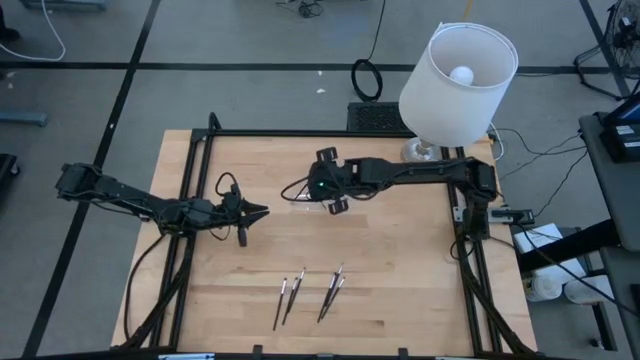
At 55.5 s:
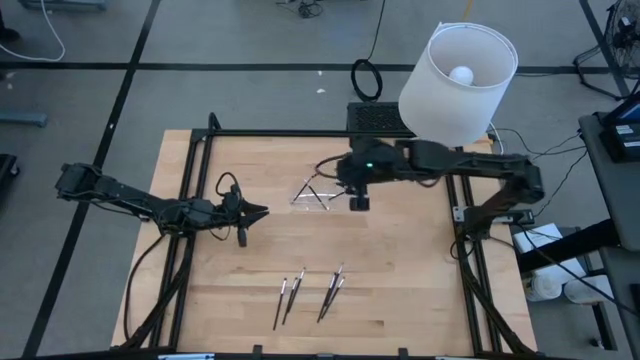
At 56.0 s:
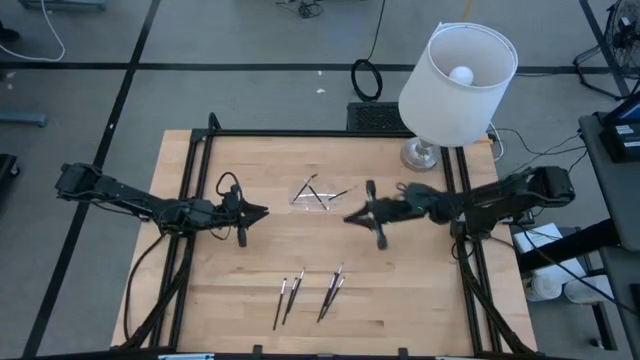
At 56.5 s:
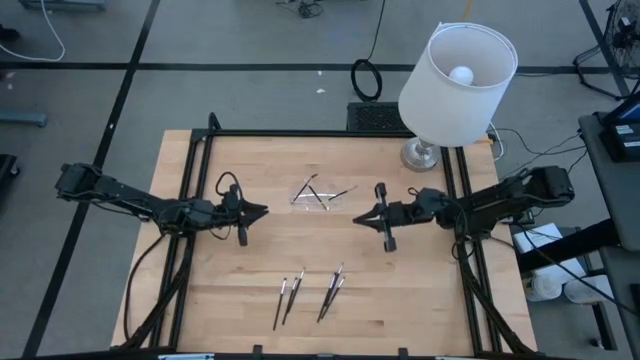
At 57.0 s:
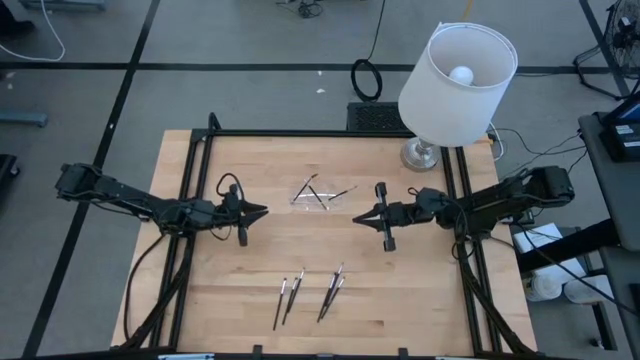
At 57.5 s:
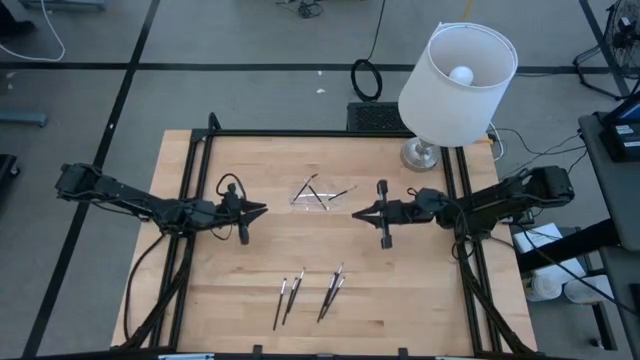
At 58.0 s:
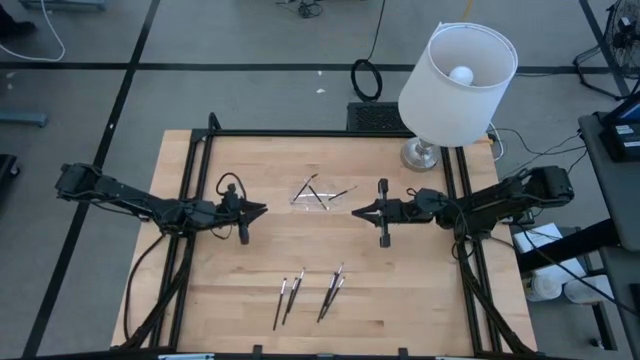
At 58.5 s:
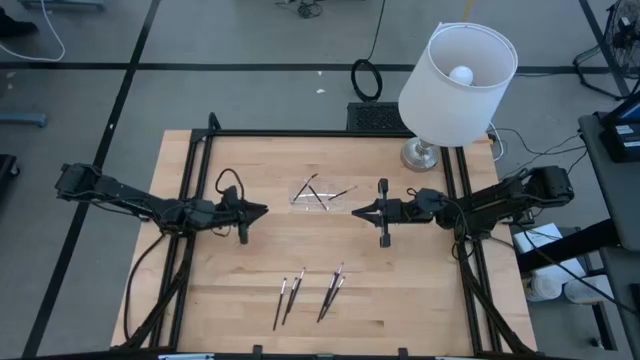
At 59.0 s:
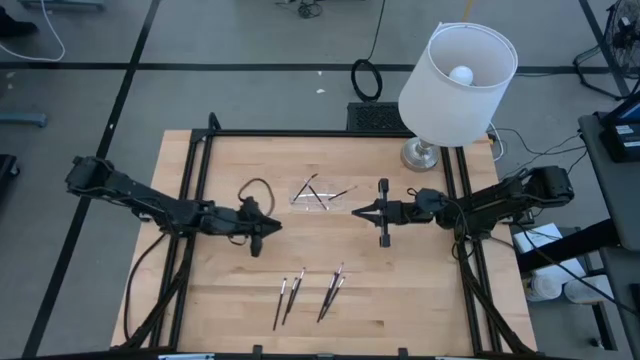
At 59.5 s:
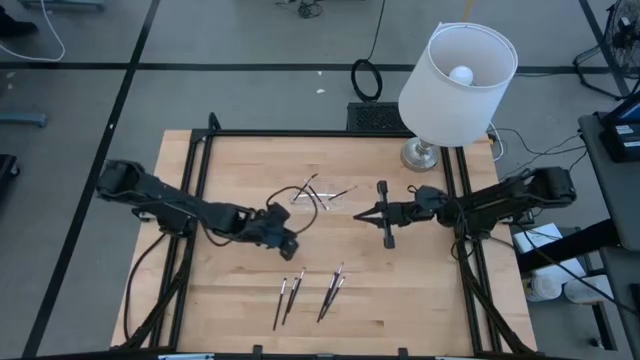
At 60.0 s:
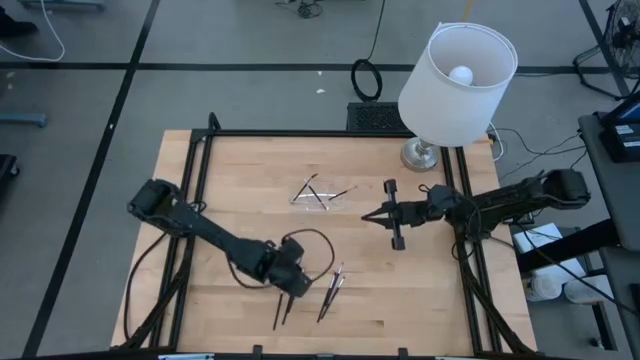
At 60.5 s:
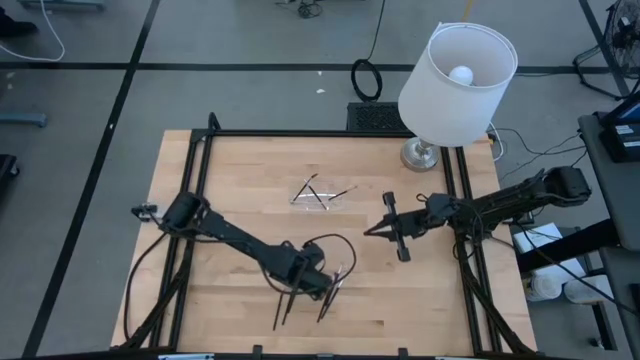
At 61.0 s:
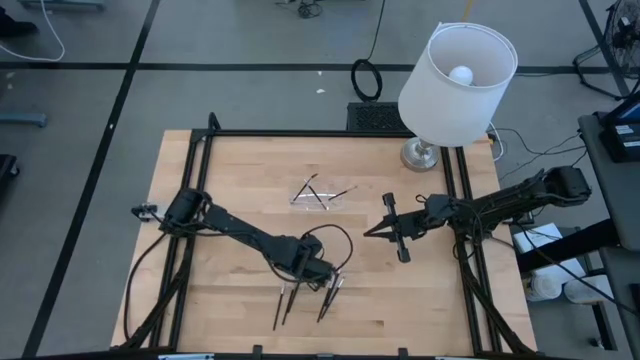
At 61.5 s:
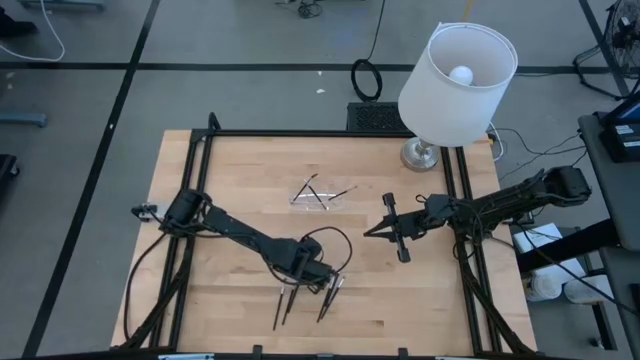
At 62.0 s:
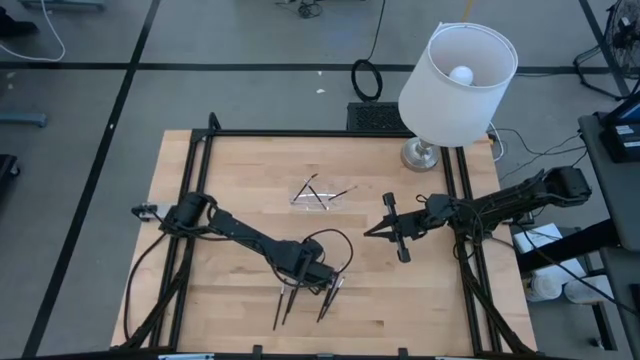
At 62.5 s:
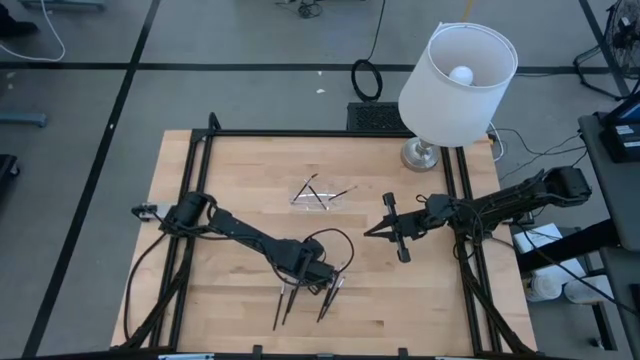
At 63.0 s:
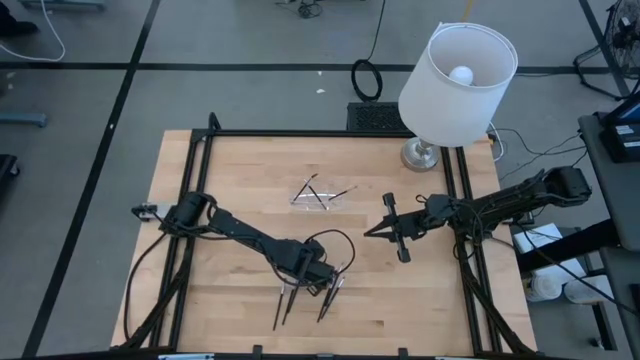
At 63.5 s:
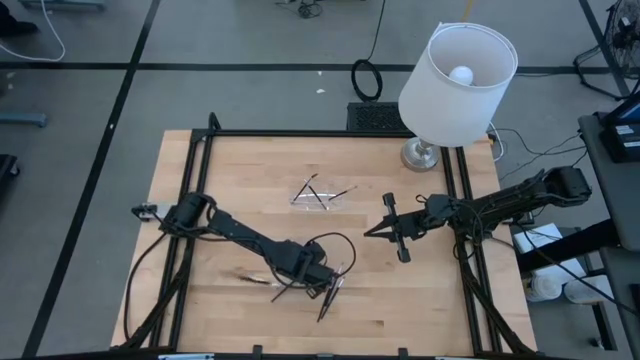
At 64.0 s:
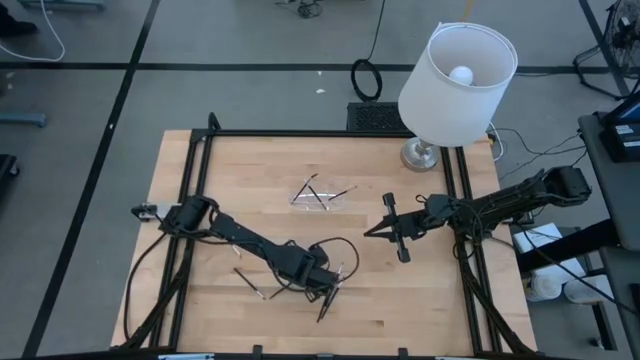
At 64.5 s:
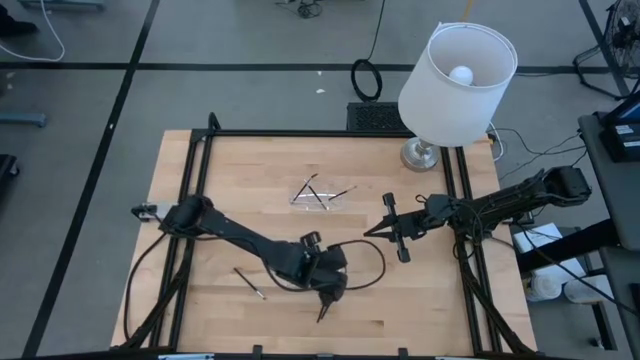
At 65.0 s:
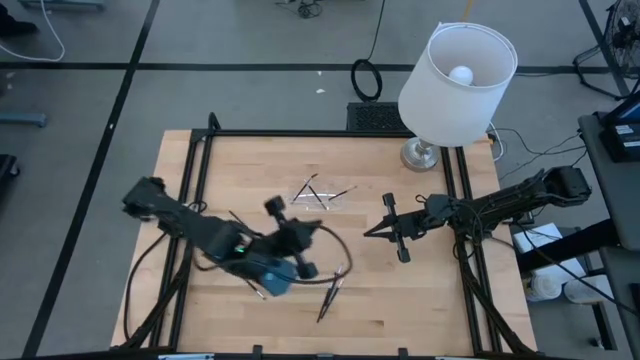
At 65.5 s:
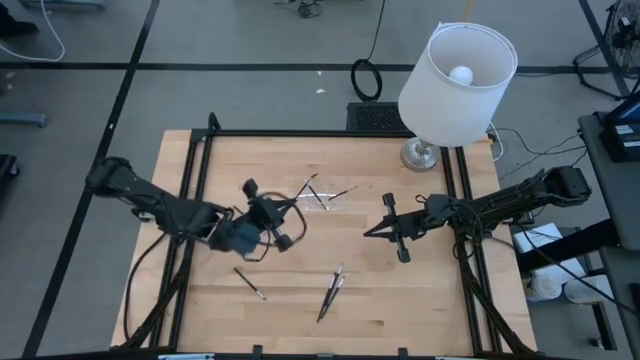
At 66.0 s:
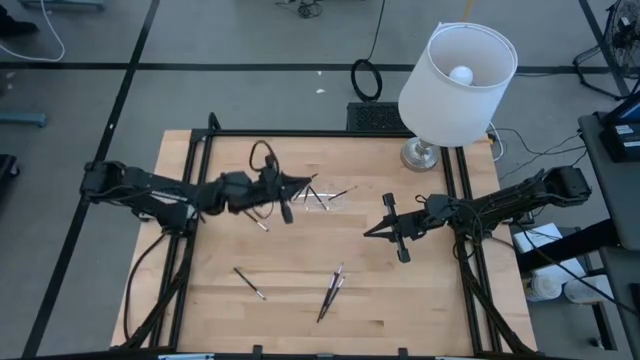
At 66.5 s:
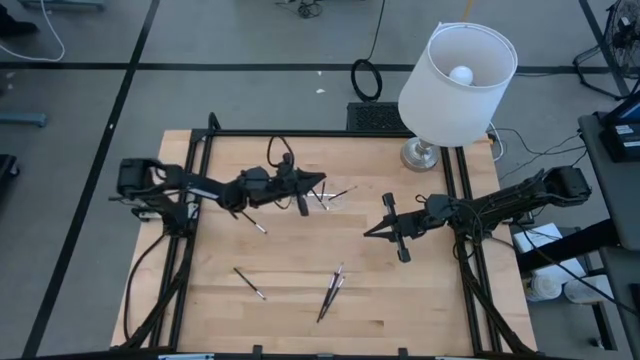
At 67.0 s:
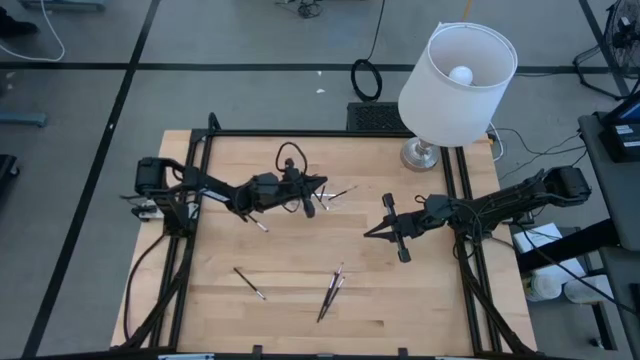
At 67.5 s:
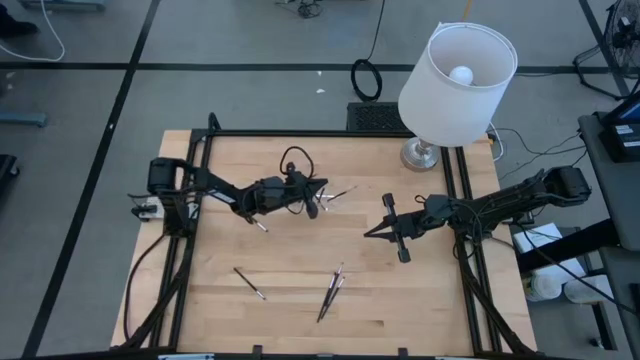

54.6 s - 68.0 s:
Task: Put items in baskets/containers
Put the black eyeshadow brush into the transparent organizer
